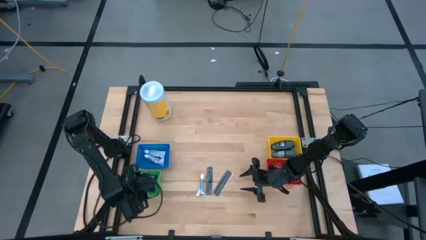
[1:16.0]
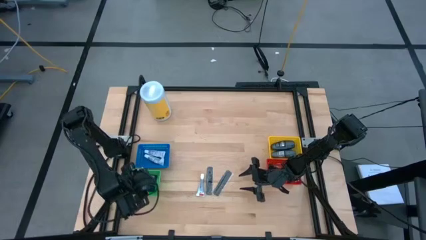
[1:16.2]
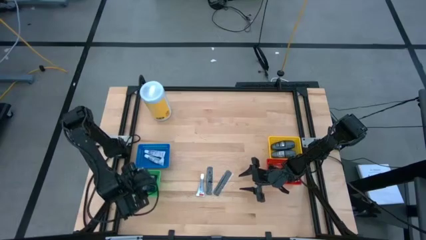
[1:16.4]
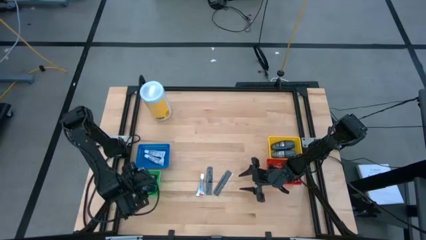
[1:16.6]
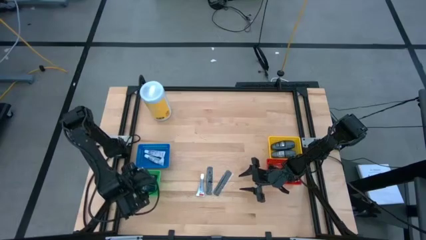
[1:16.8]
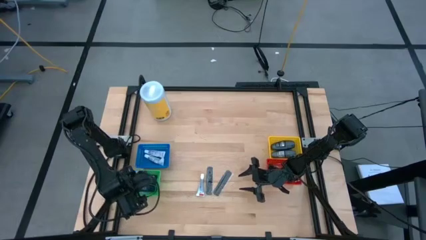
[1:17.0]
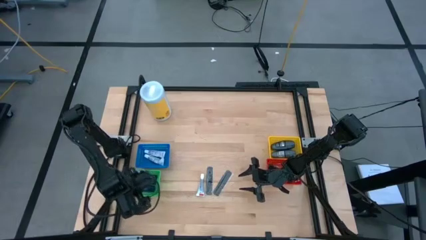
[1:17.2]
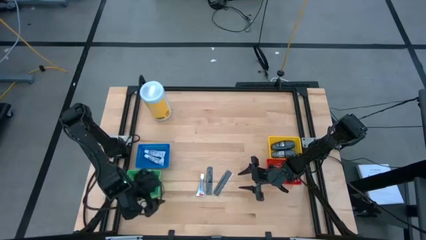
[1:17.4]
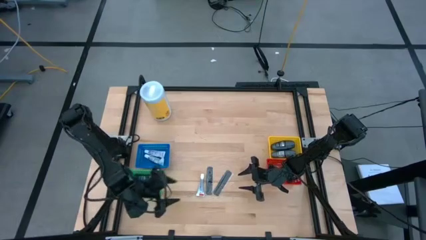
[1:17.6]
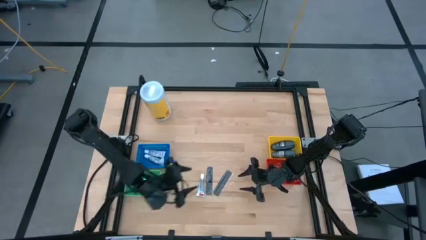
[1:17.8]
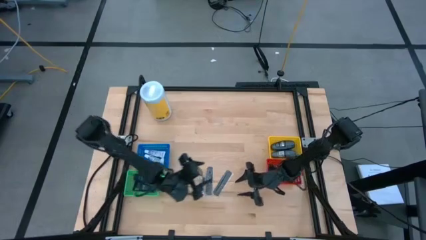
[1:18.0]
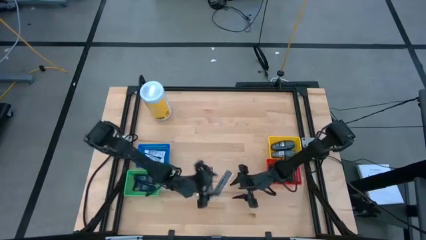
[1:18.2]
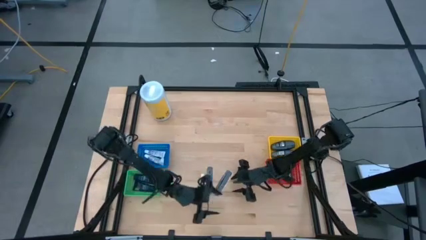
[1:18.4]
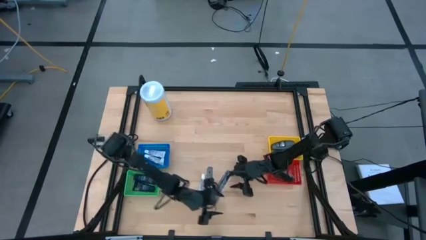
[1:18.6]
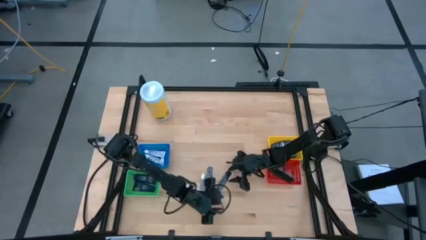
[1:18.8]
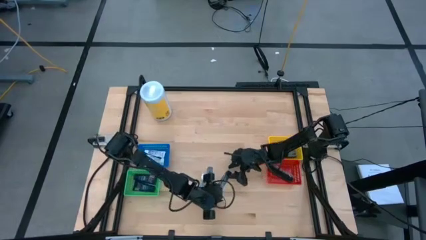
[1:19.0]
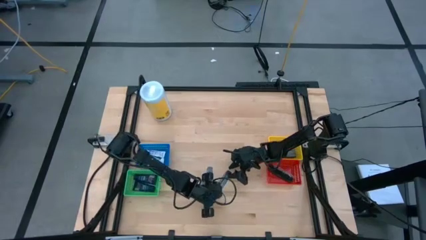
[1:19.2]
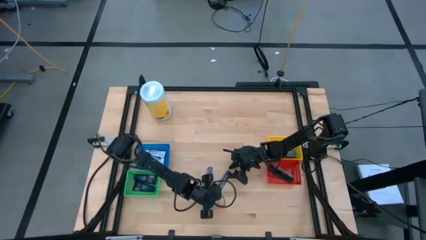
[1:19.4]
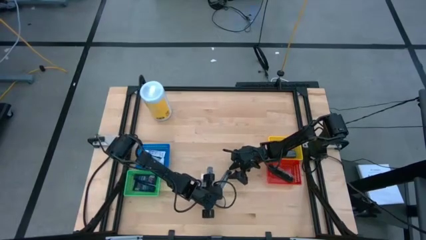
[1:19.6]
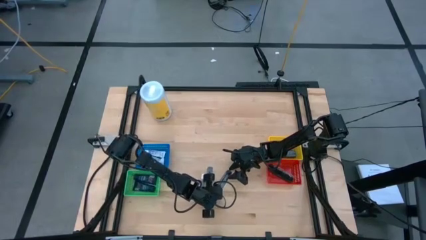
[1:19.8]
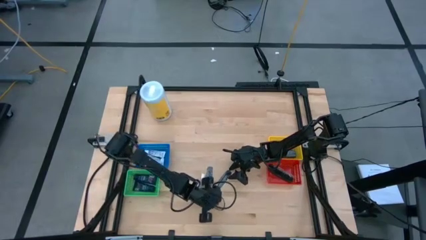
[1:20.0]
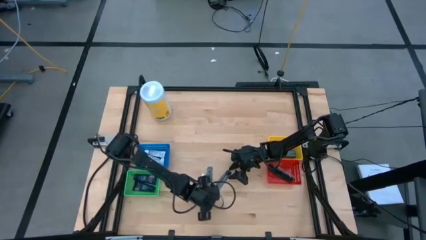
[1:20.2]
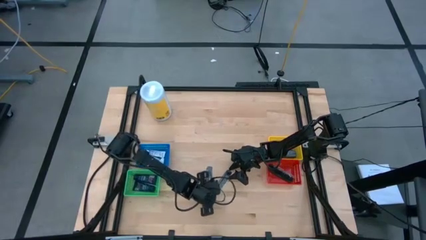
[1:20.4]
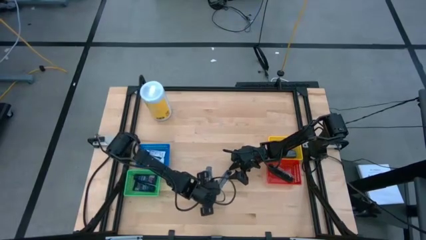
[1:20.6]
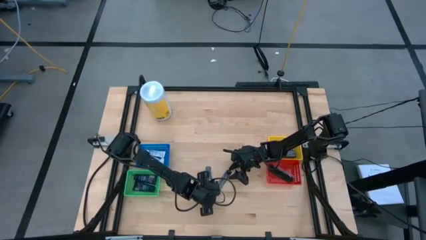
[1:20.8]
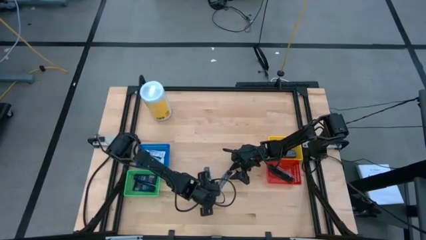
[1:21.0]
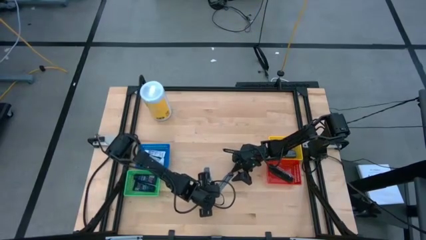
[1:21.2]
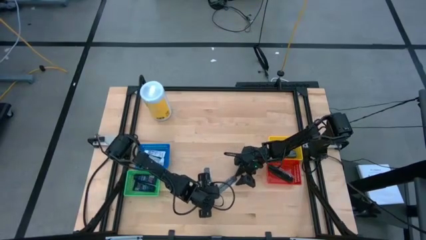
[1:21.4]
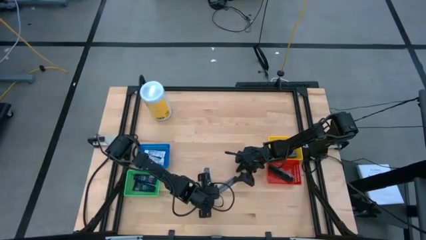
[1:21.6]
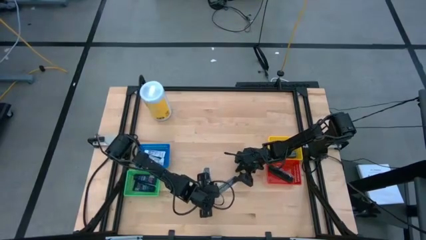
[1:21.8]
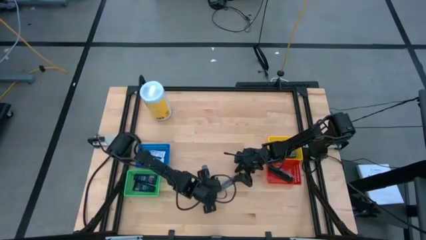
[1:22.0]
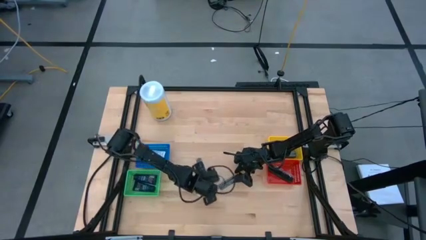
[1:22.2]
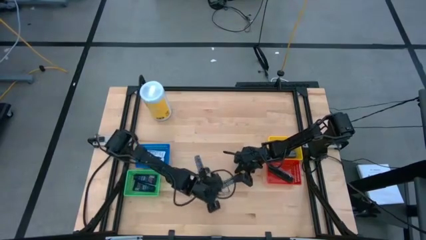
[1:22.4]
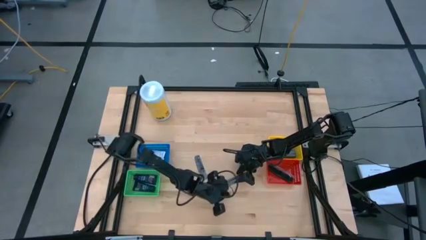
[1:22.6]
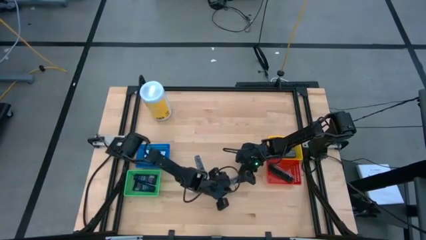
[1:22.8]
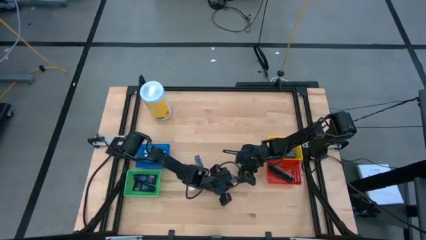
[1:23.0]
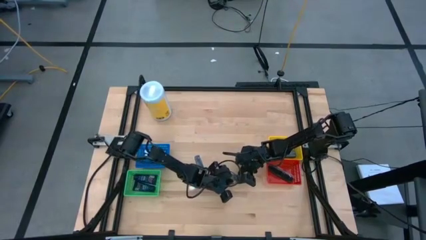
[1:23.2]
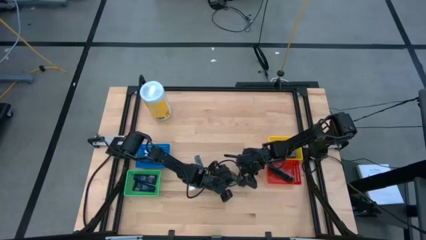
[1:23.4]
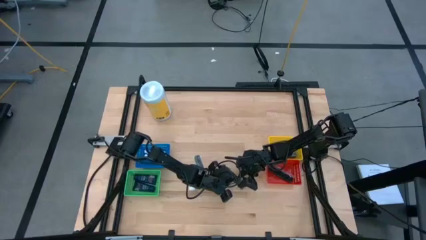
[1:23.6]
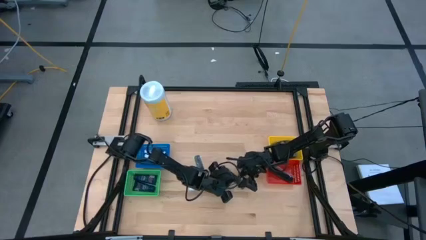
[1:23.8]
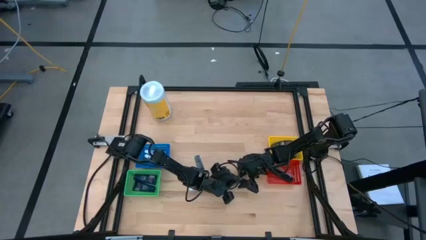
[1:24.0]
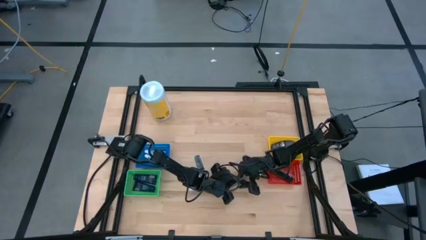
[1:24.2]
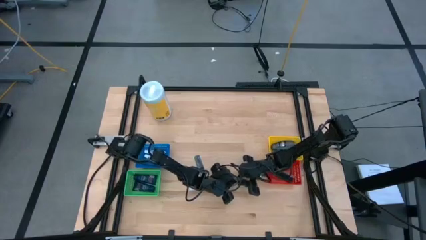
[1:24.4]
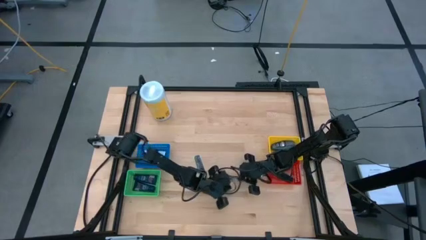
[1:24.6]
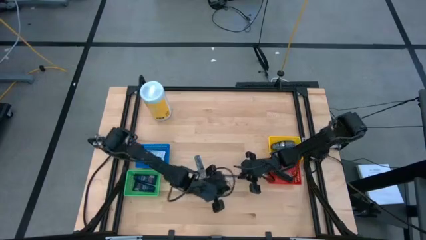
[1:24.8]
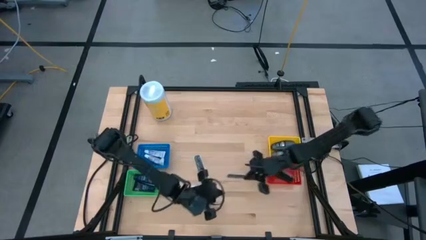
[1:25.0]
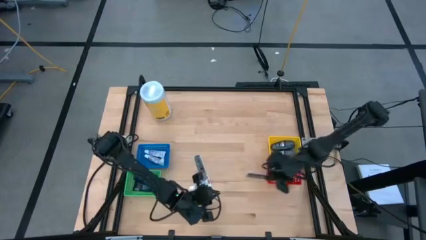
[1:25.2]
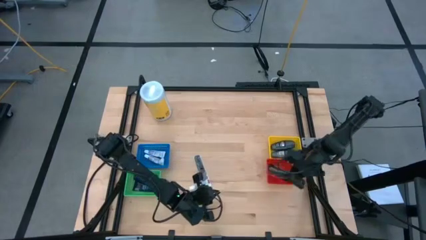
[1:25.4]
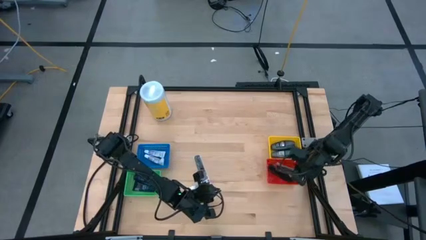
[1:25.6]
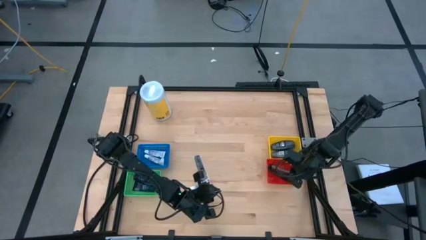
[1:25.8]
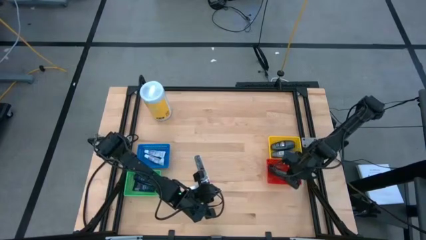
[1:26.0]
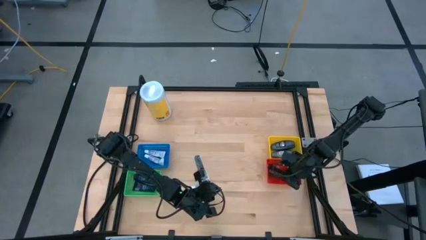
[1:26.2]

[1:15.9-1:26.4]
Task: Pick & Place Travel size toiletries
Put the black comb into the red basket

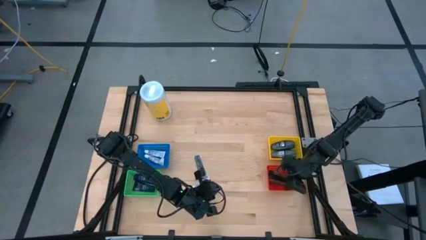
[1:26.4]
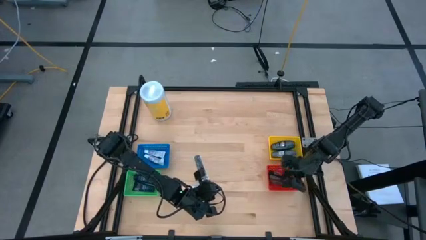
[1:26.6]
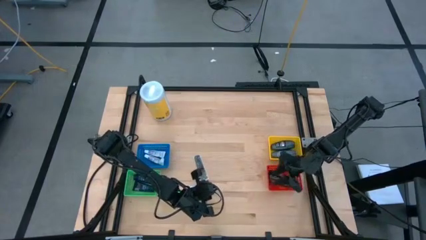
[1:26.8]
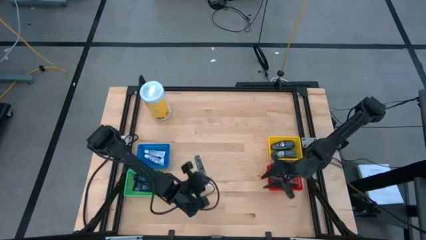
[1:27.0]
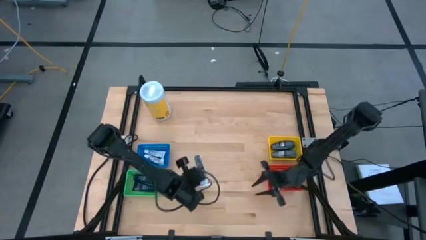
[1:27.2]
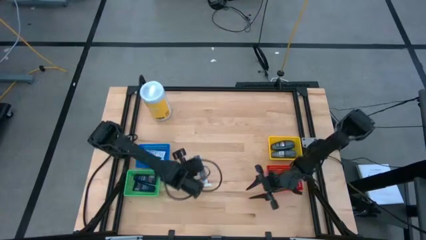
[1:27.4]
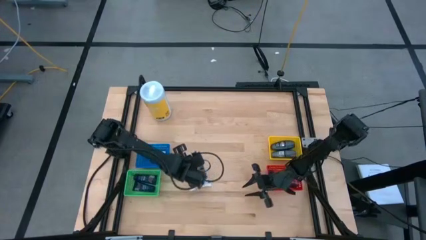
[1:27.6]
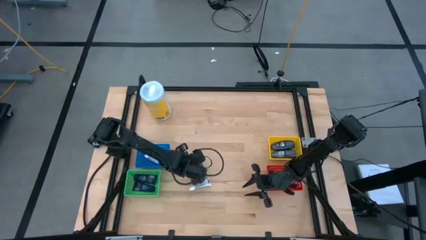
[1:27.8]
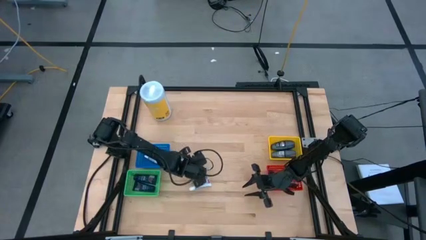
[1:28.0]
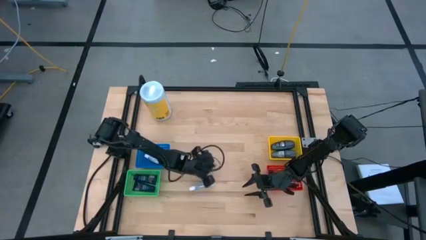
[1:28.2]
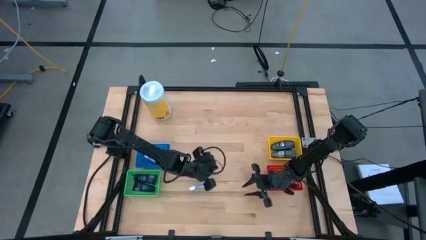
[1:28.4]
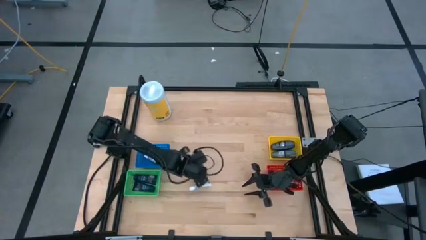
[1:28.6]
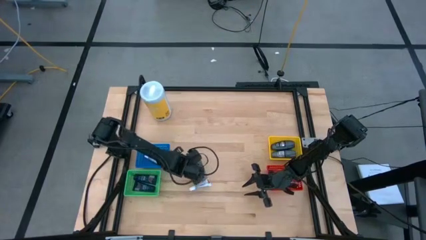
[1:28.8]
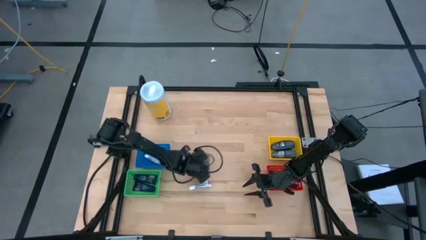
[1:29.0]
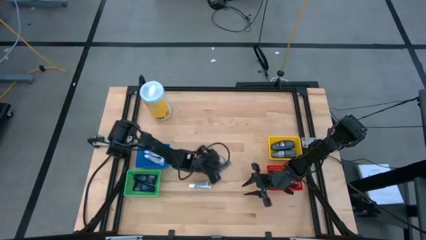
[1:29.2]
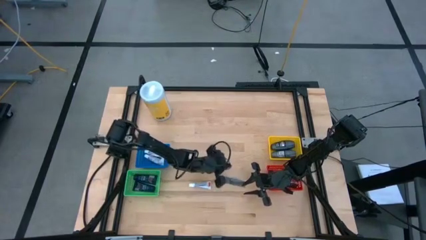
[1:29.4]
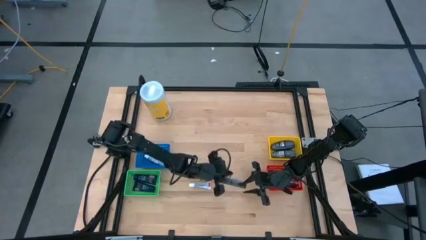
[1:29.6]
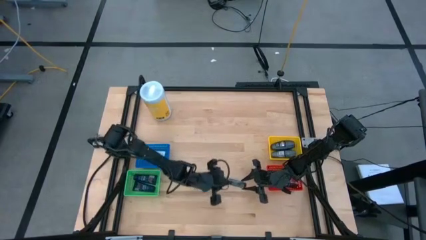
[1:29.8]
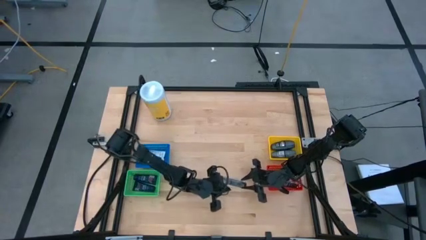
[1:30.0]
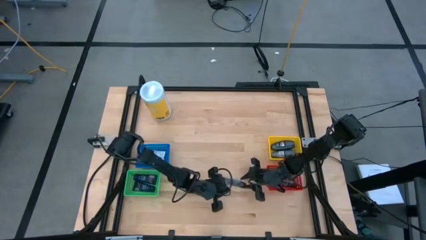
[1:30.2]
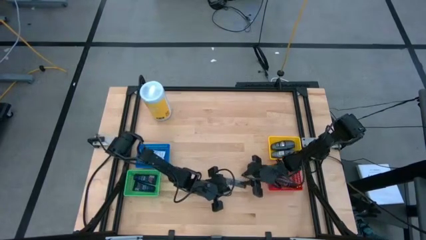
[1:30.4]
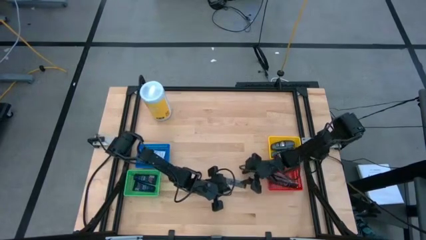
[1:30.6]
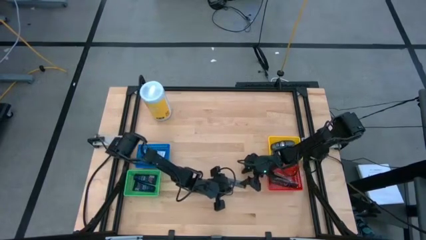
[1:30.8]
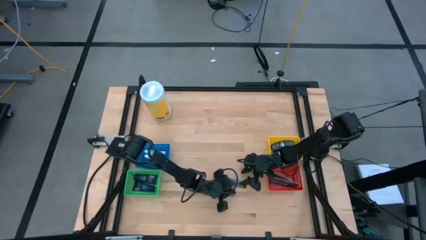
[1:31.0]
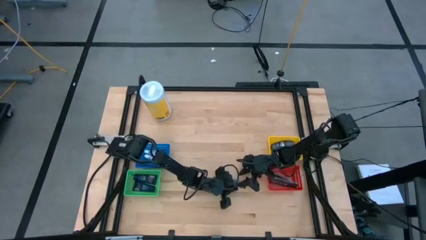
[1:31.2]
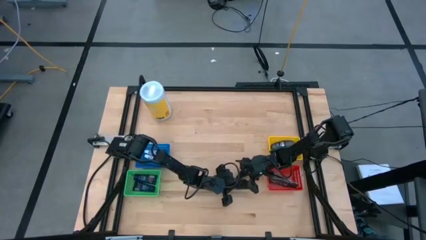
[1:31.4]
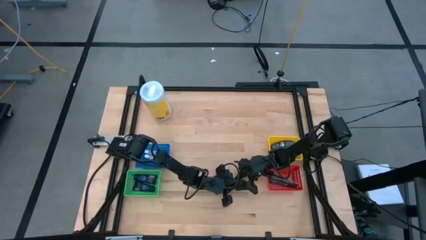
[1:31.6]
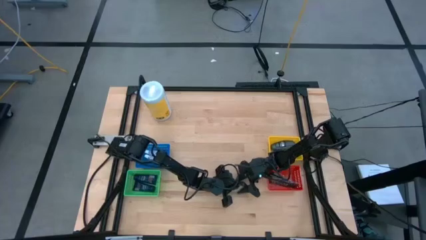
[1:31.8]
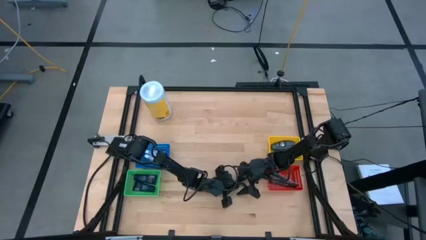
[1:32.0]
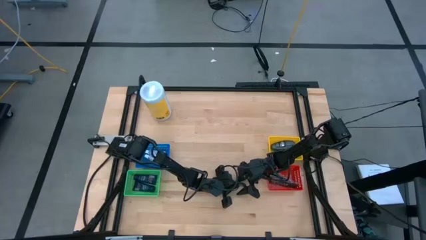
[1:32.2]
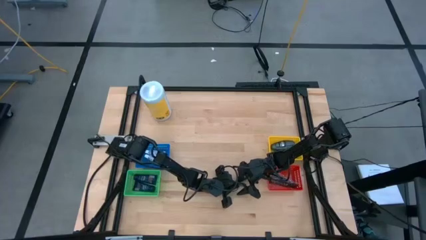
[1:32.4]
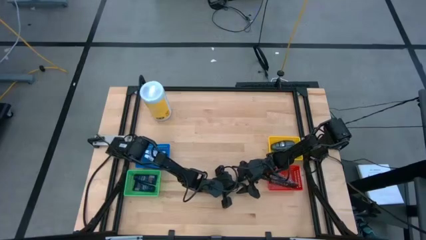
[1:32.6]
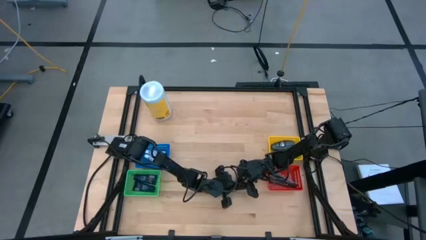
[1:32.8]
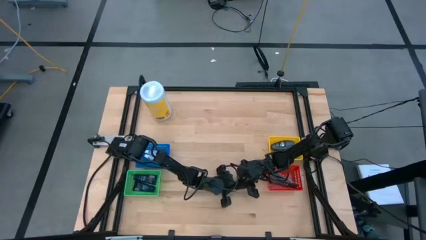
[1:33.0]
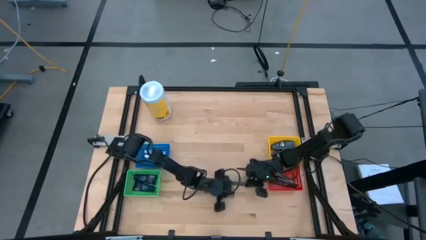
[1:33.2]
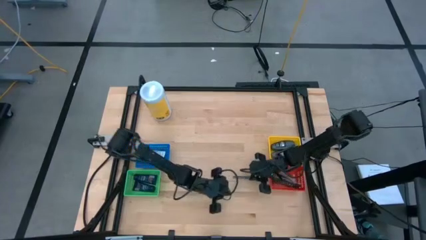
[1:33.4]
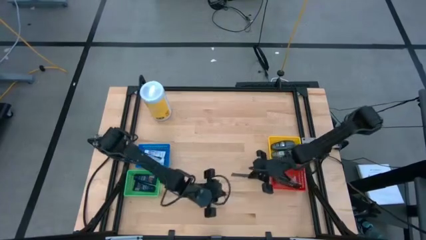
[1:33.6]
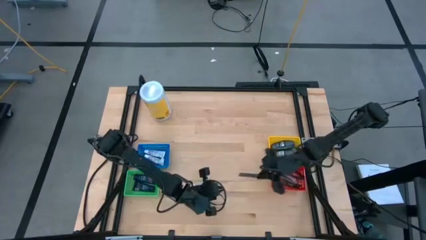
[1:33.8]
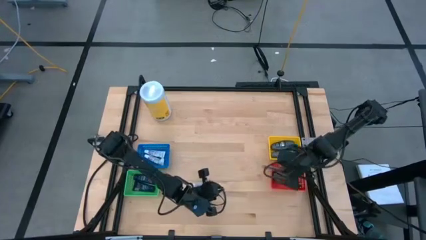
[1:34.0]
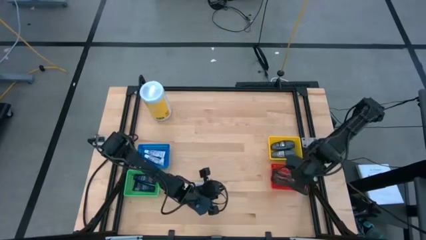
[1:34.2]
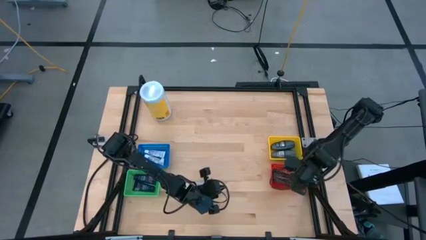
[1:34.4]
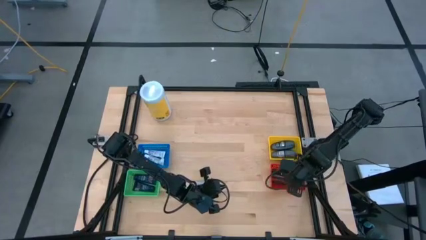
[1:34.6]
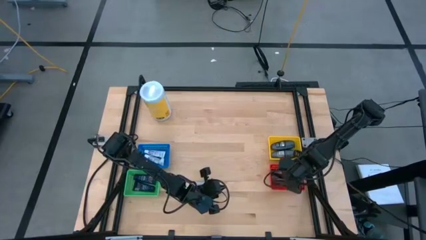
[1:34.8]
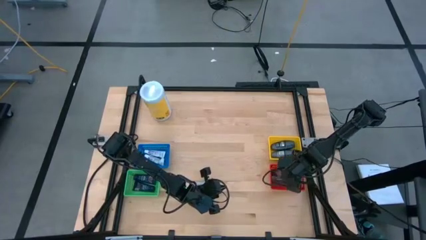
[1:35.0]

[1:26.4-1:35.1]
Put the black comb into the red basket
